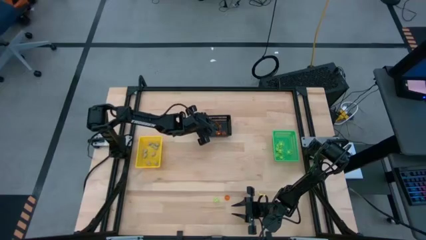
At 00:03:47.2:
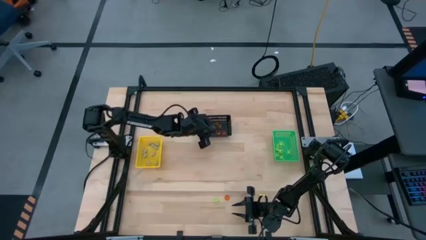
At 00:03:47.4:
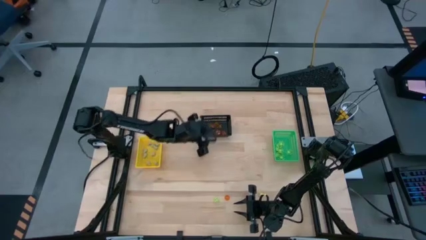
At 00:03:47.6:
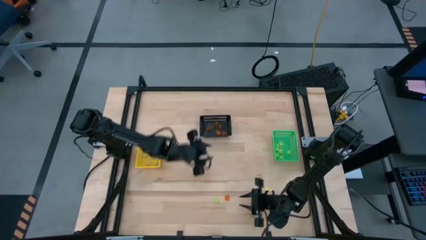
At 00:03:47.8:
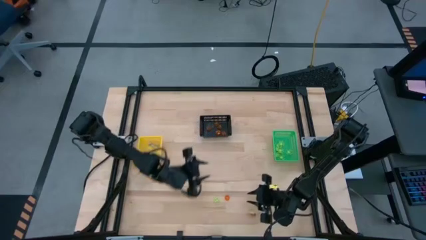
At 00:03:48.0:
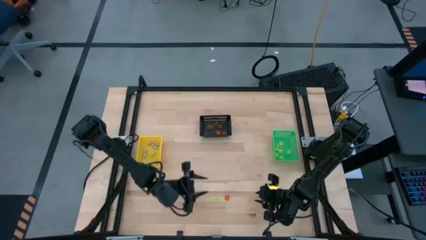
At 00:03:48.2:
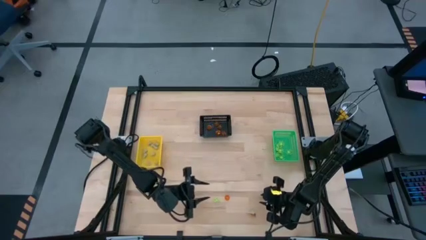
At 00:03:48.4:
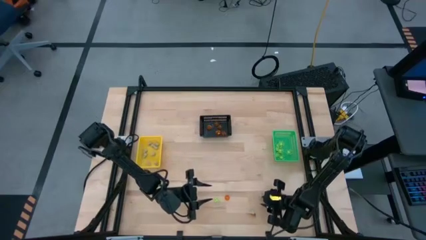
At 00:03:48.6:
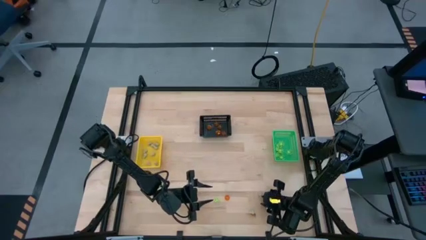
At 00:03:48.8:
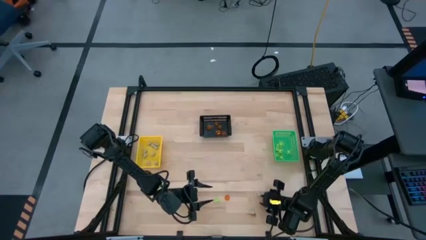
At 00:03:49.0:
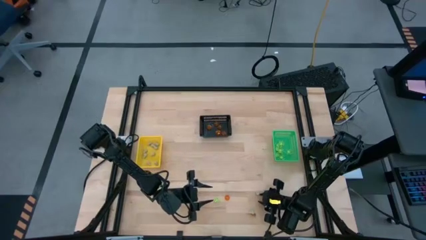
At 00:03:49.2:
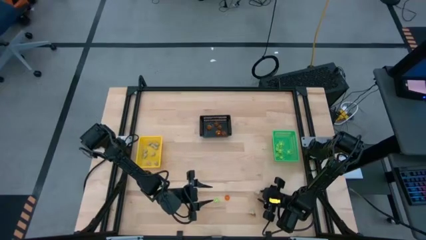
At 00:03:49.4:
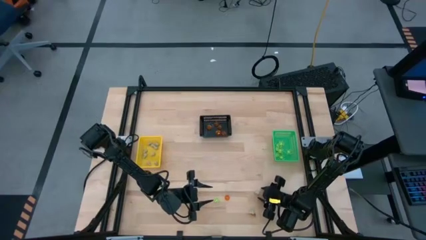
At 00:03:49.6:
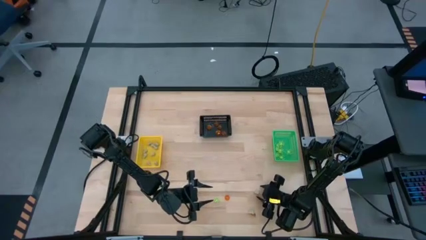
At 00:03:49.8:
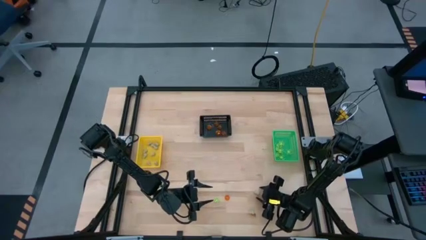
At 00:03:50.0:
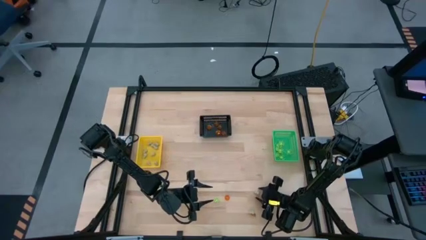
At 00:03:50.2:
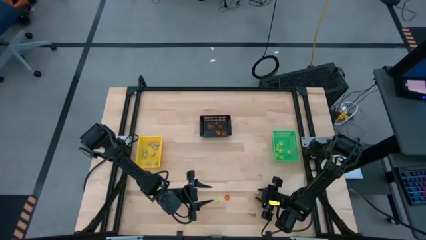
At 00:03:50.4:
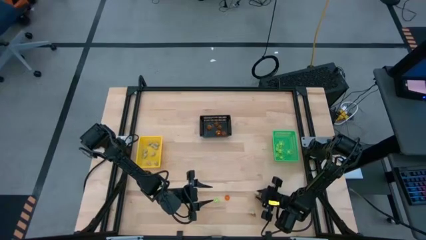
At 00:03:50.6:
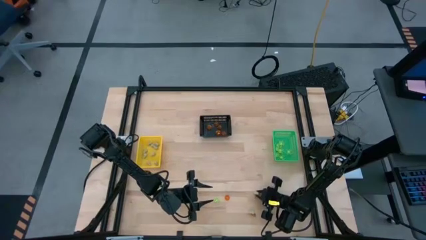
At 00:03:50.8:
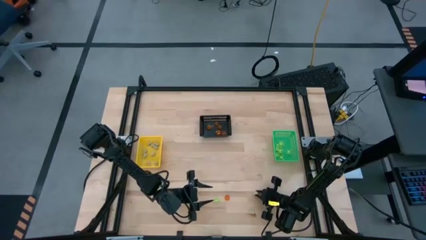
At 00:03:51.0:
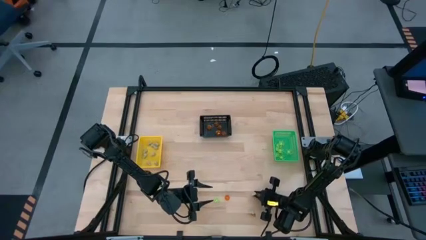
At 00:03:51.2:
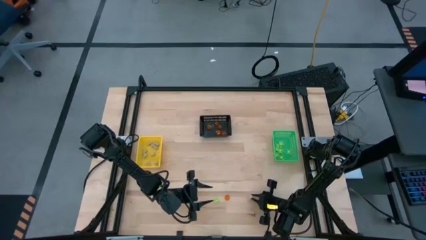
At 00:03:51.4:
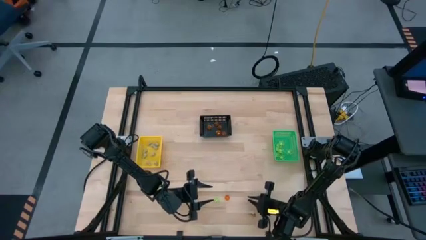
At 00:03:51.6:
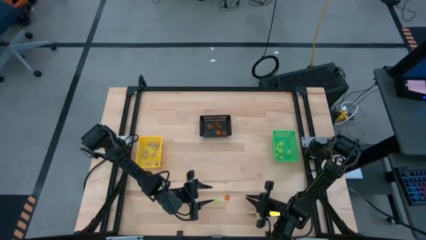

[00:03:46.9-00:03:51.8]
Task: Sort Halloween decoration
Put the skull toy into the yellow bin

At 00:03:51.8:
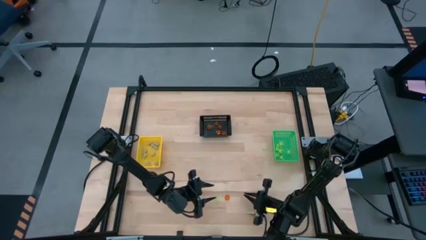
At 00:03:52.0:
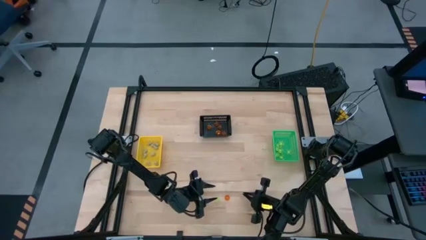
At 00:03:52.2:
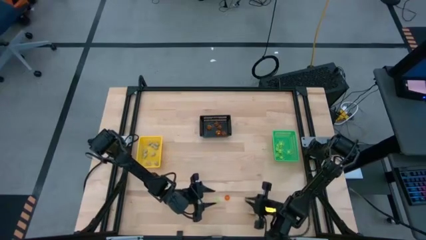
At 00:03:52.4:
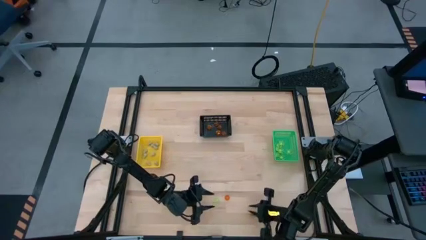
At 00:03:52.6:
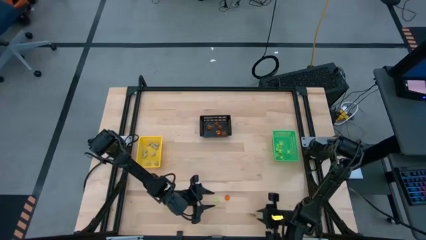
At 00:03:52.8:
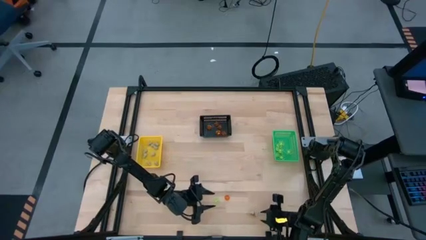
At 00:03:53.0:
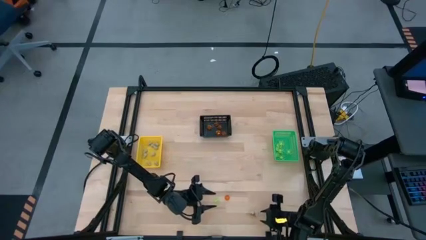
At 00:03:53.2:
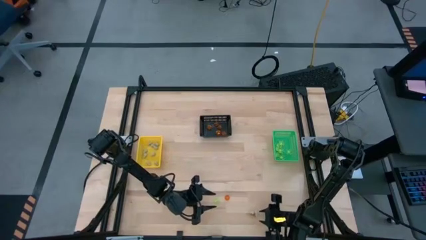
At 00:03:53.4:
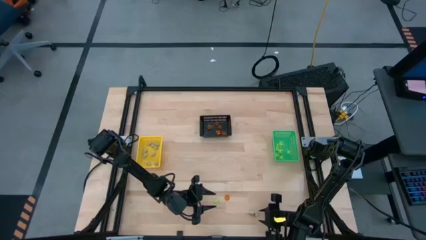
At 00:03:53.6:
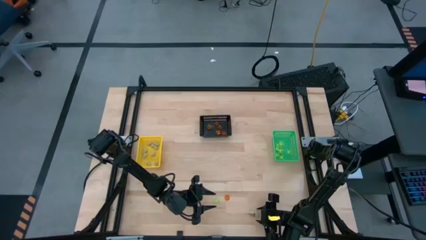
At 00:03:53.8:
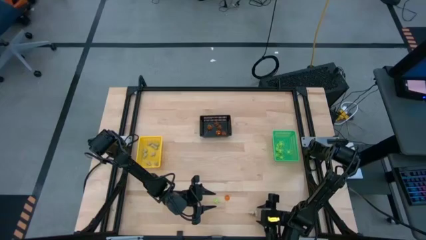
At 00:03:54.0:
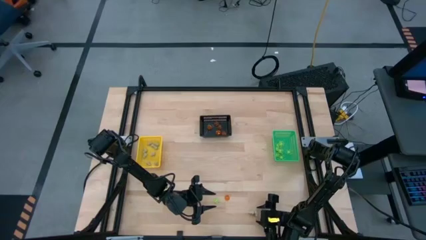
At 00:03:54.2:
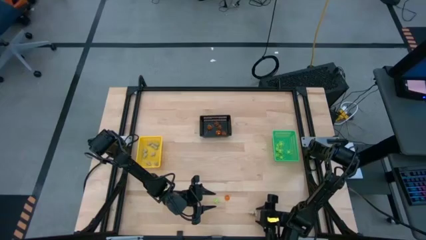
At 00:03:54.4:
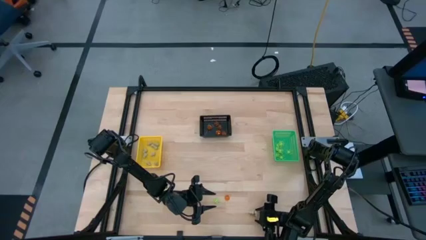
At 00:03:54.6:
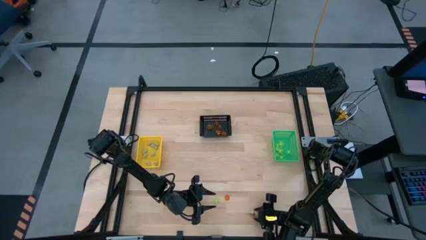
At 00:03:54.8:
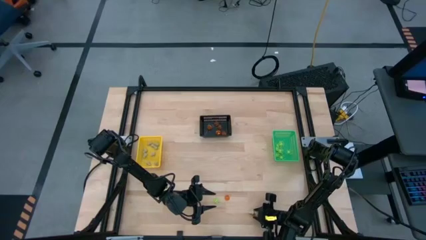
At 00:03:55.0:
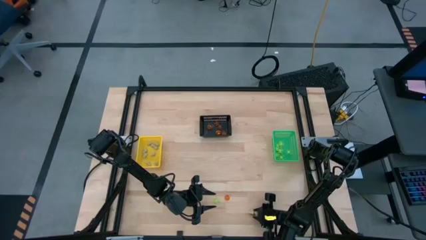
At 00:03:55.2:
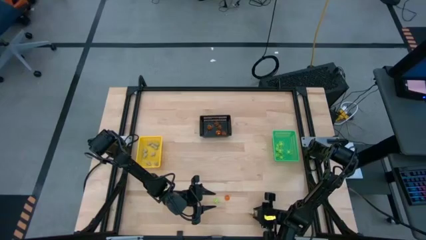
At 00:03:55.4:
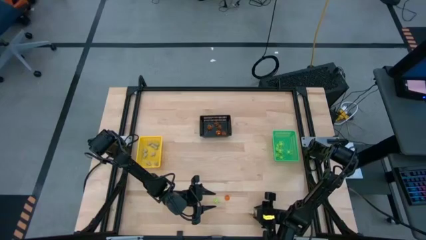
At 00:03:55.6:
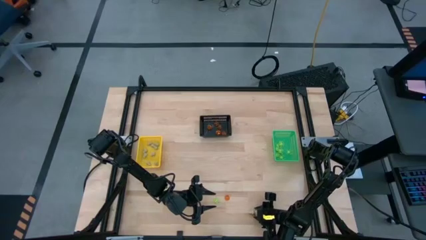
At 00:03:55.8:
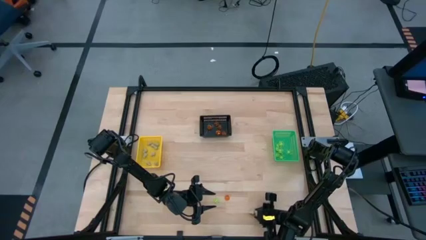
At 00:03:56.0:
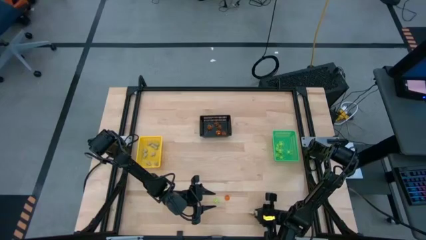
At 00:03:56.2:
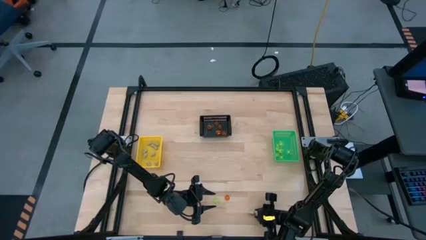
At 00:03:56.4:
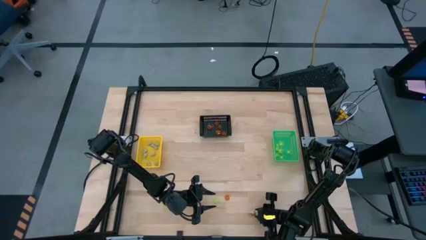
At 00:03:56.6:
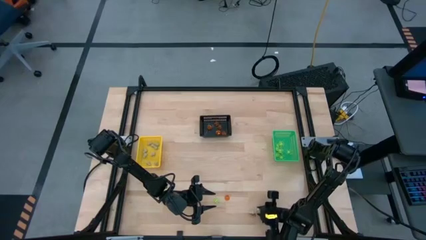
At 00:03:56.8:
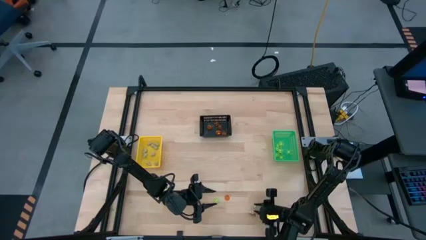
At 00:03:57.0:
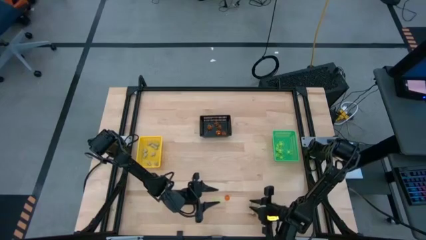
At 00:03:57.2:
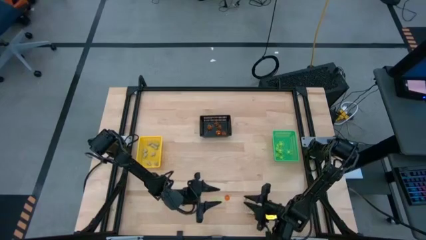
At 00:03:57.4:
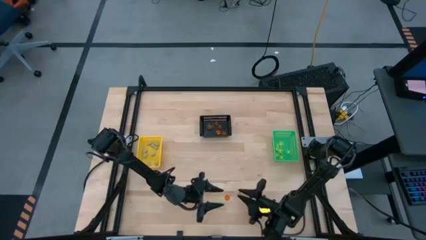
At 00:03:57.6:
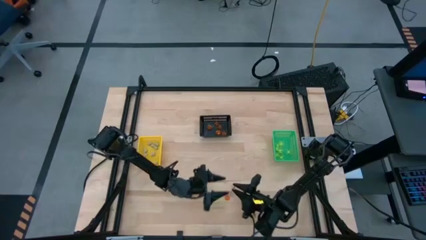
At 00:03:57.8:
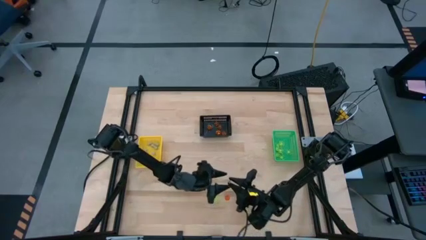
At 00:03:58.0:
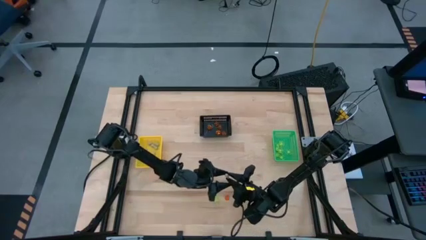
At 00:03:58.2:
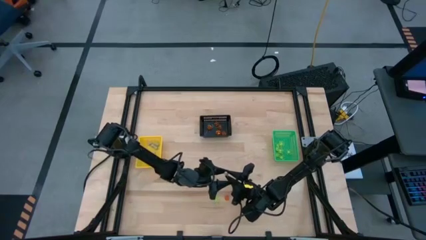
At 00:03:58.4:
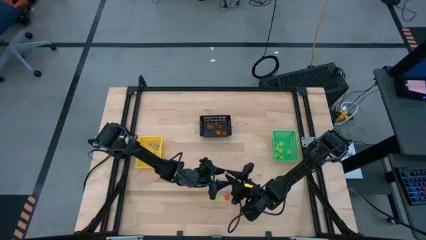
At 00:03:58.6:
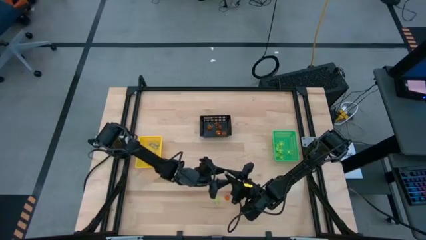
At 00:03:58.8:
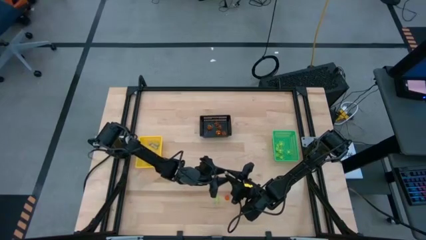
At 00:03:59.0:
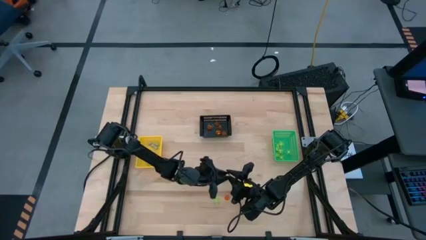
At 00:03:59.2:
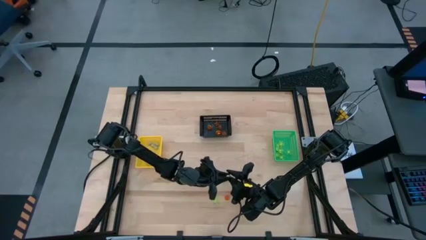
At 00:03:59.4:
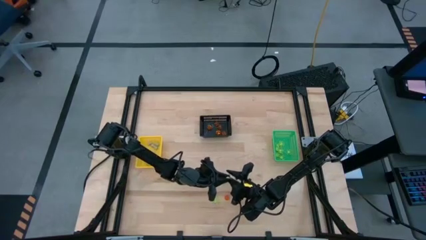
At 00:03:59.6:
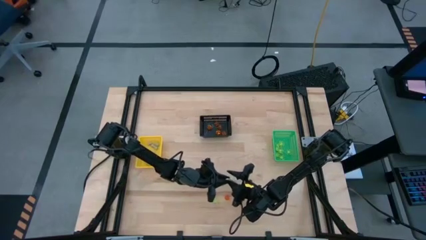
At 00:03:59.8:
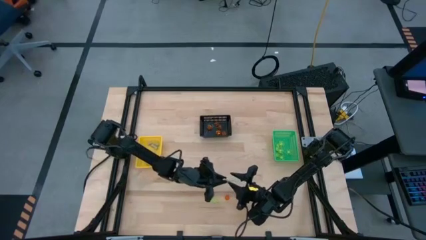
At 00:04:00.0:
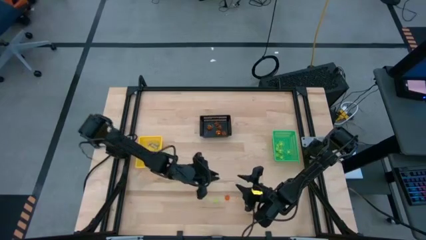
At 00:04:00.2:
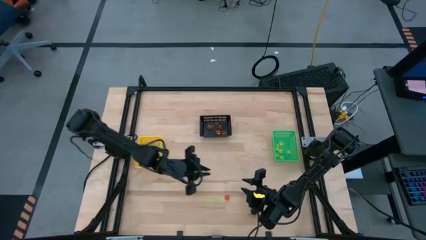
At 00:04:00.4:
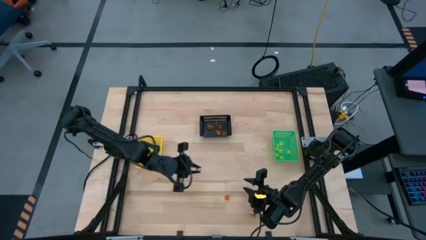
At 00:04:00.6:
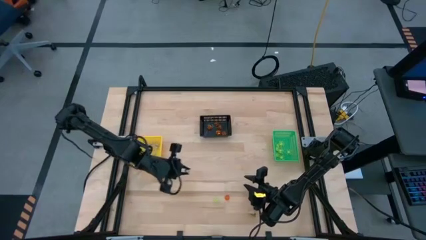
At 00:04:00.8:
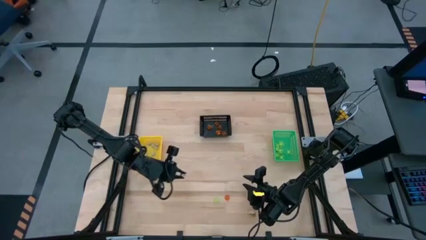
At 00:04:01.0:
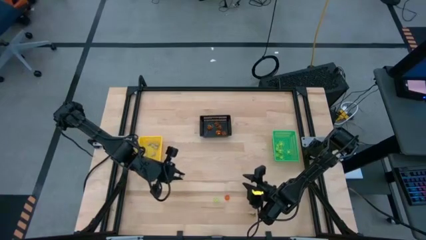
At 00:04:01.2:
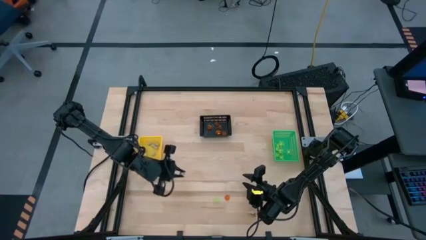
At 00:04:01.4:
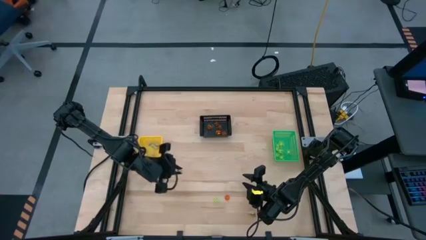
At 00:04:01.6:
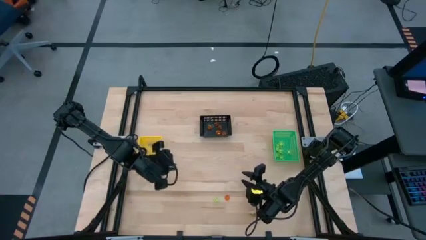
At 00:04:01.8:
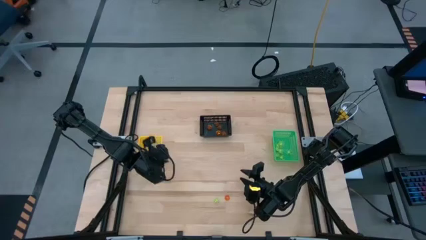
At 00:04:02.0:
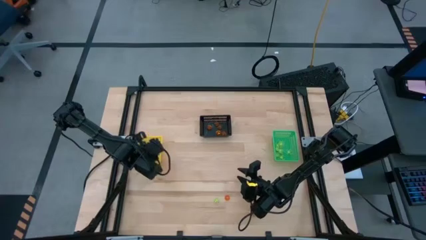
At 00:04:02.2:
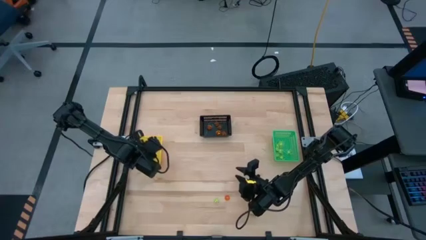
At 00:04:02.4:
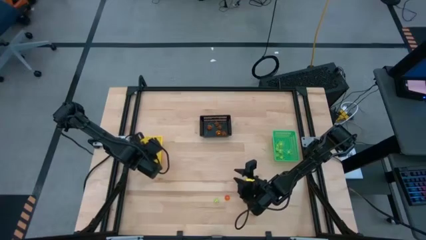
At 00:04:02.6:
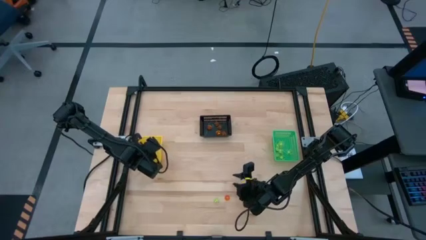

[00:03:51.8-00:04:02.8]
Put the skull toy into the yellow bin
